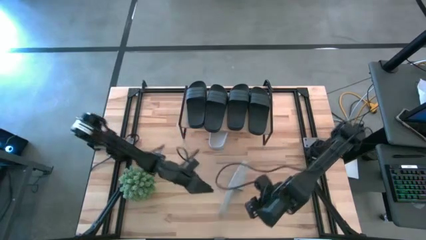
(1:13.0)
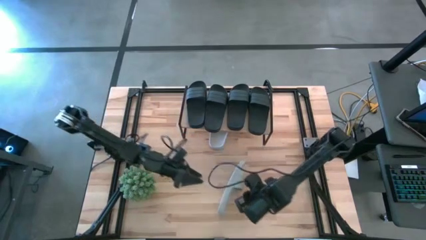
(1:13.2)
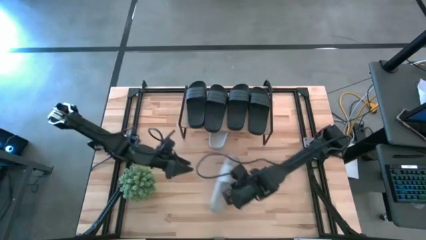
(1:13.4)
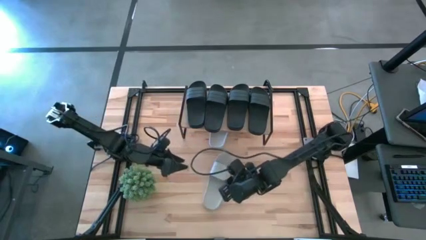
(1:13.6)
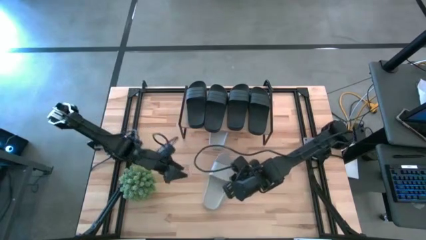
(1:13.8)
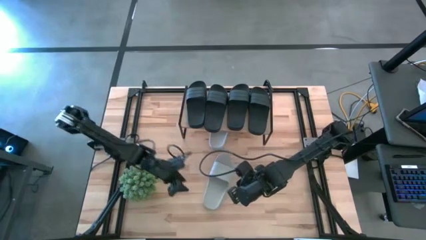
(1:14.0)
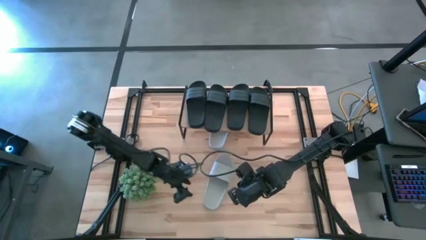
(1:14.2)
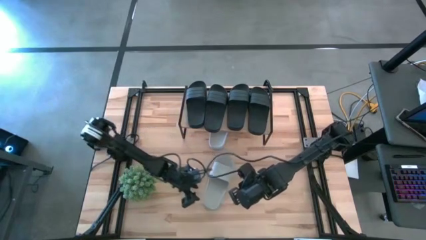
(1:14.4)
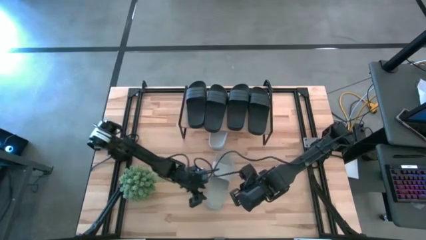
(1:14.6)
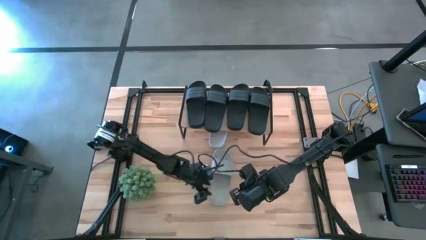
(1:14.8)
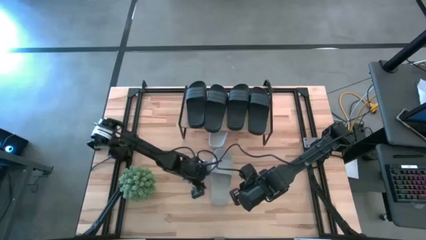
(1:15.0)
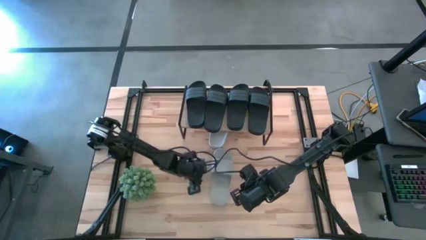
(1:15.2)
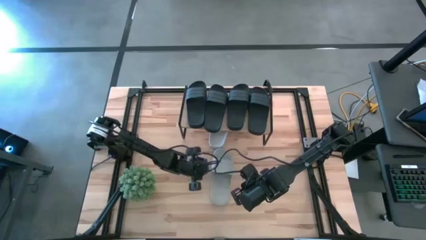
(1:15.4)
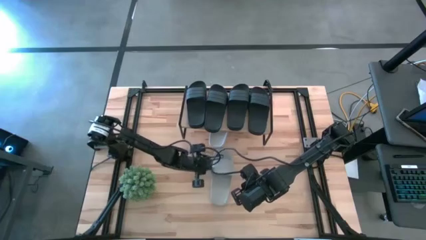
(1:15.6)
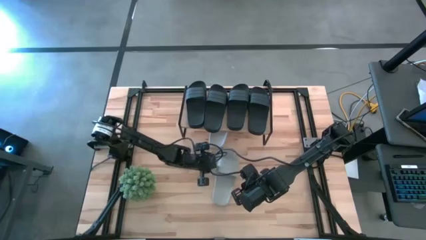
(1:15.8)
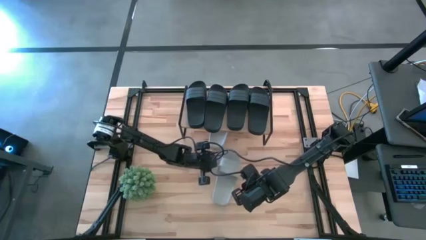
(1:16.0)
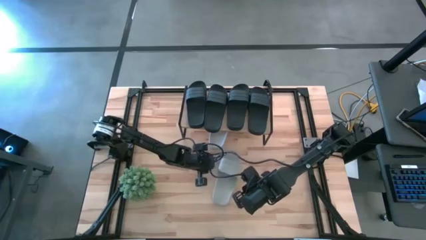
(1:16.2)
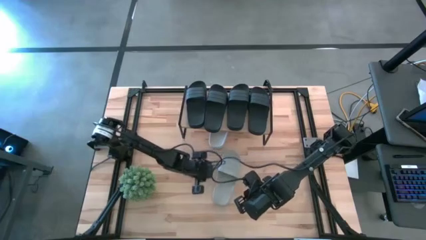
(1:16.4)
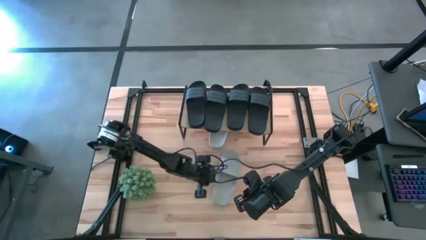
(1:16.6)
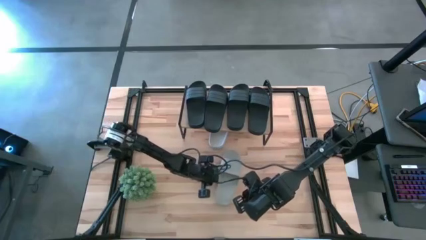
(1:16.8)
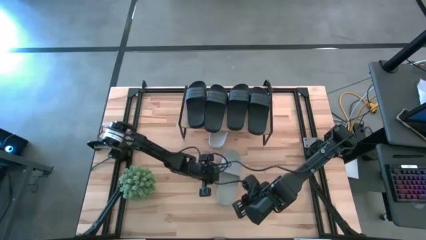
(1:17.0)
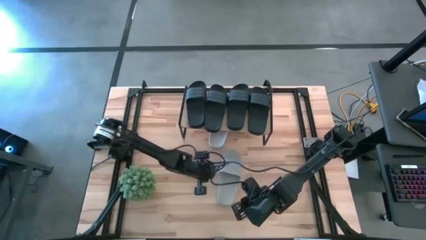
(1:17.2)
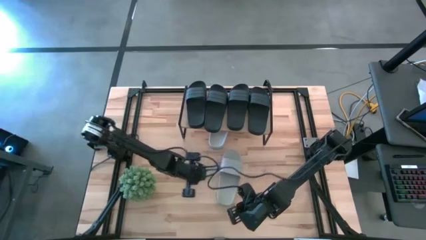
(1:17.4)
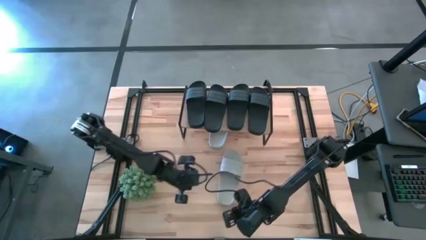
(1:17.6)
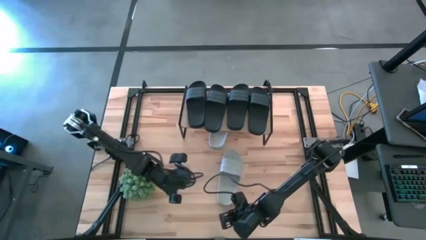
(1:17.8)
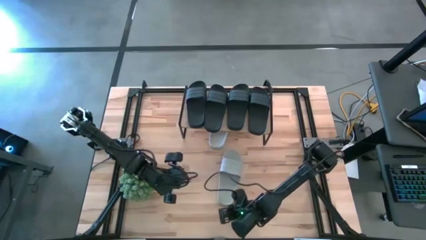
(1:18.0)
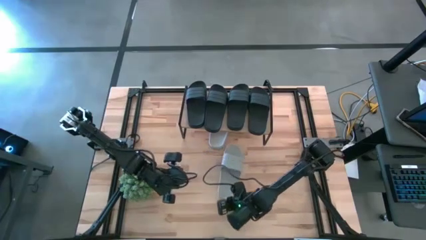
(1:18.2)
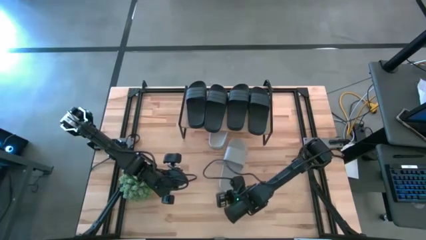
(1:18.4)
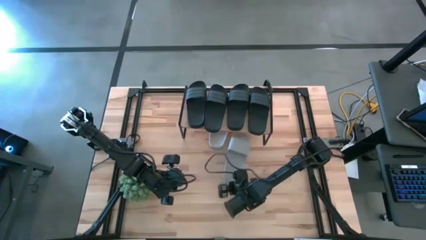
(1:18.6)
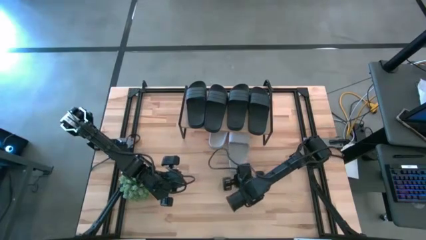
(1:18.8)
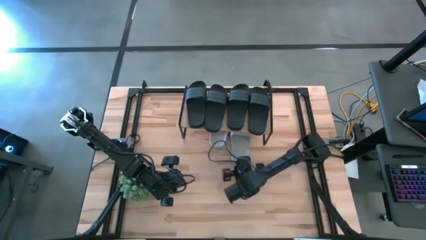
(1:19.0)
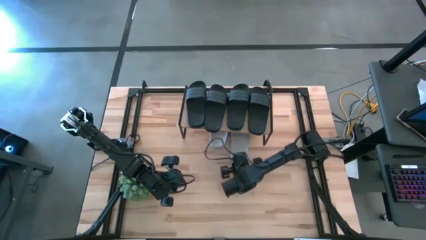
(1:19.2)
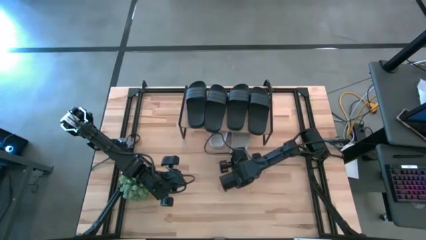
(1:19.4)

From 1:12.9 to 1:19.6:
Task: Pick and place slides into the shelf
Put the right gray slipper under the shelf

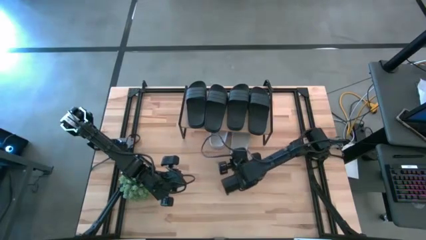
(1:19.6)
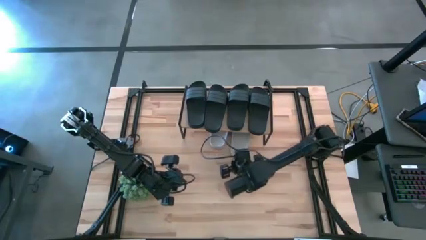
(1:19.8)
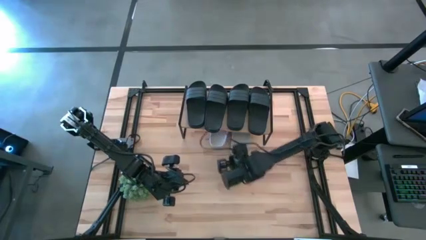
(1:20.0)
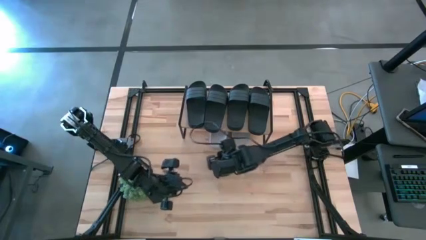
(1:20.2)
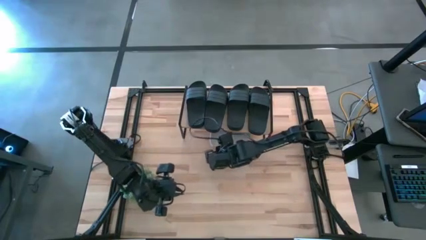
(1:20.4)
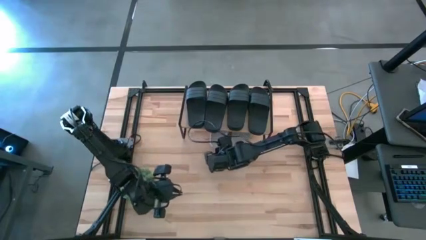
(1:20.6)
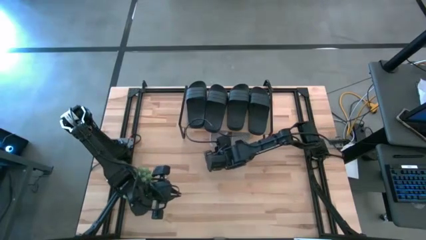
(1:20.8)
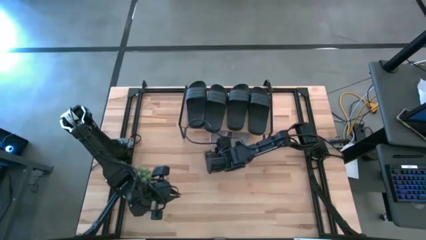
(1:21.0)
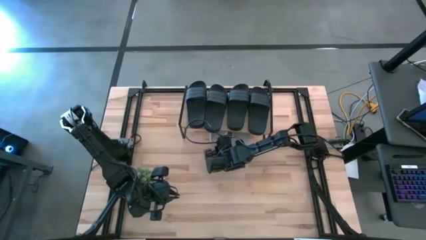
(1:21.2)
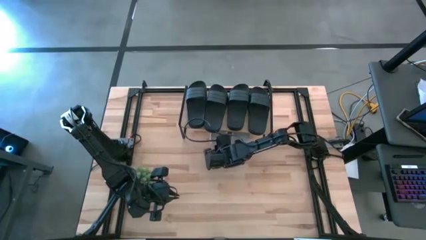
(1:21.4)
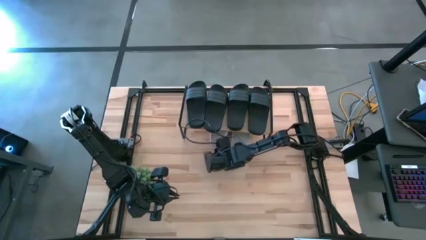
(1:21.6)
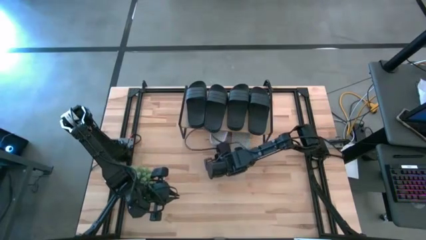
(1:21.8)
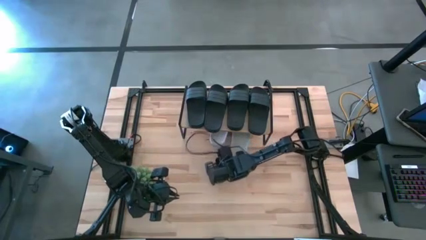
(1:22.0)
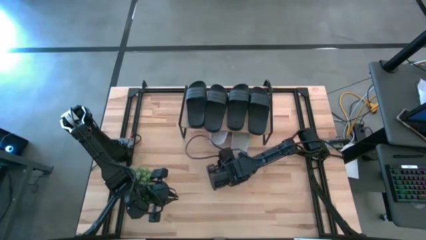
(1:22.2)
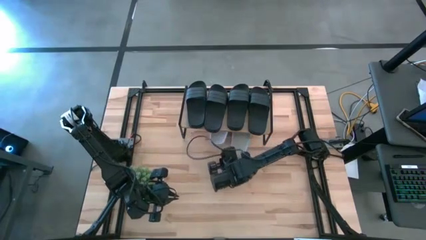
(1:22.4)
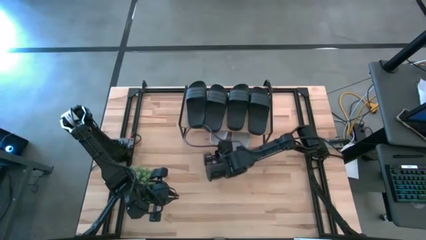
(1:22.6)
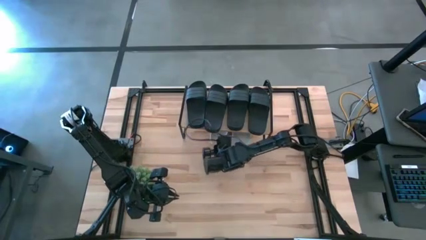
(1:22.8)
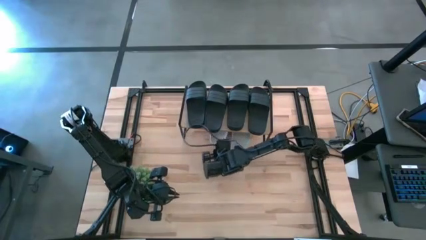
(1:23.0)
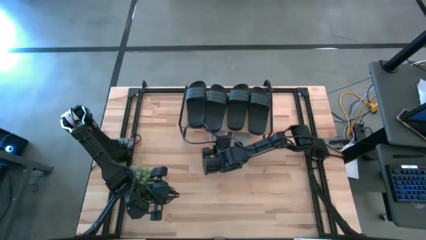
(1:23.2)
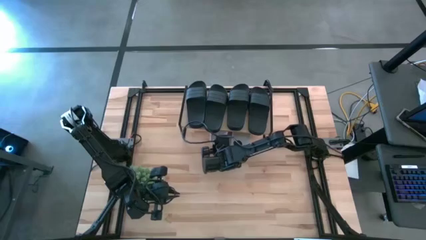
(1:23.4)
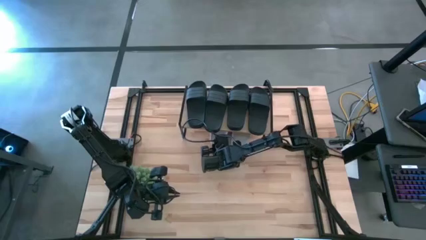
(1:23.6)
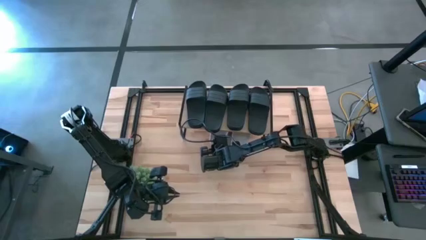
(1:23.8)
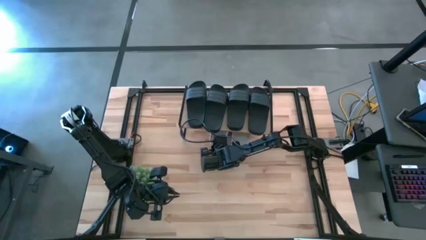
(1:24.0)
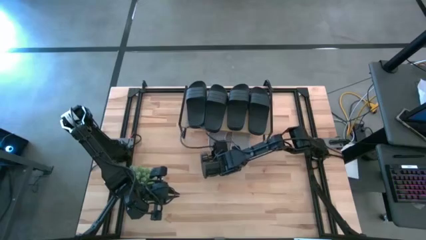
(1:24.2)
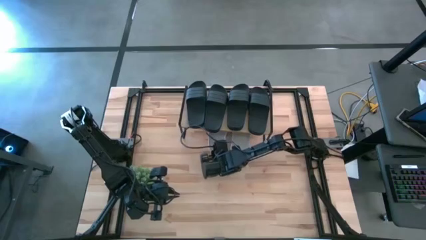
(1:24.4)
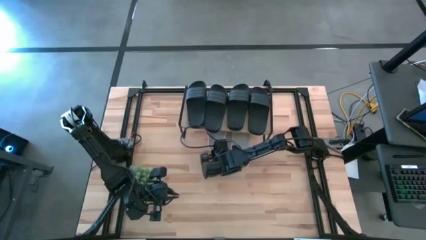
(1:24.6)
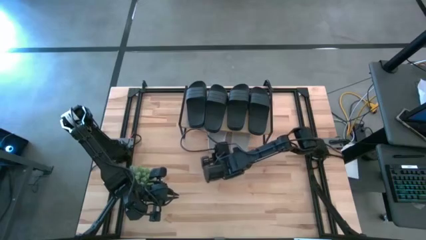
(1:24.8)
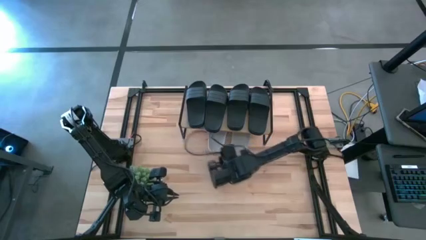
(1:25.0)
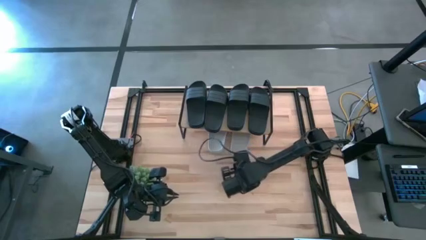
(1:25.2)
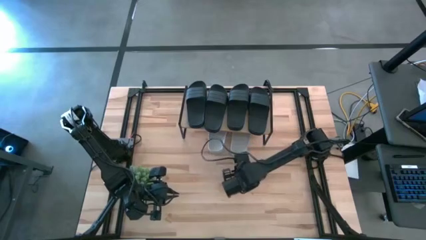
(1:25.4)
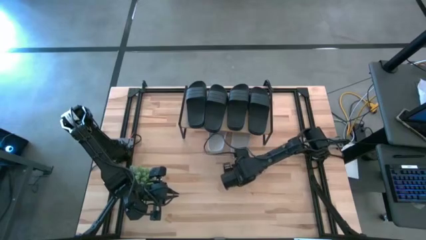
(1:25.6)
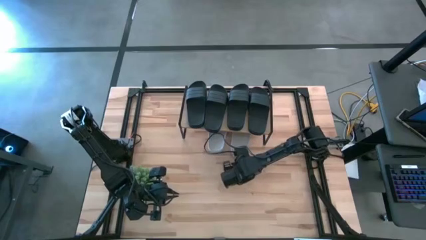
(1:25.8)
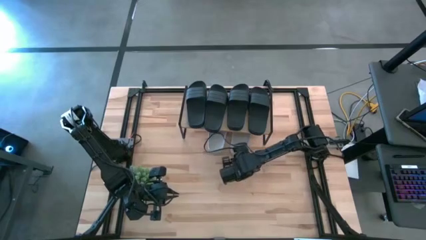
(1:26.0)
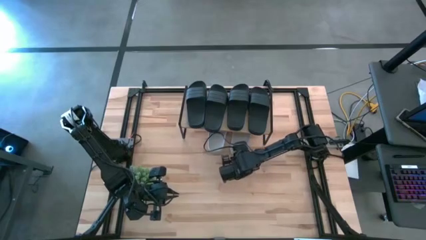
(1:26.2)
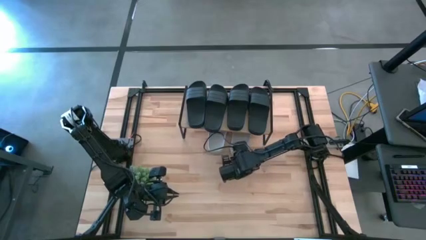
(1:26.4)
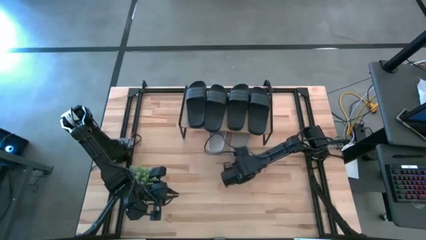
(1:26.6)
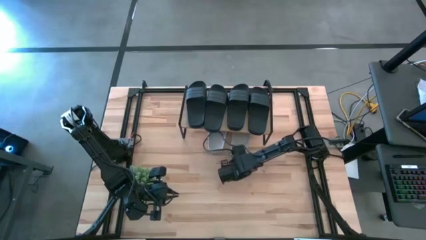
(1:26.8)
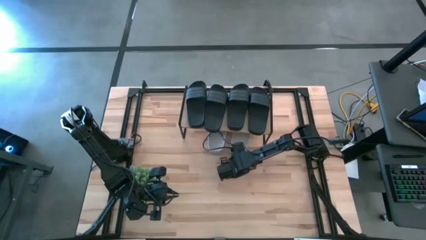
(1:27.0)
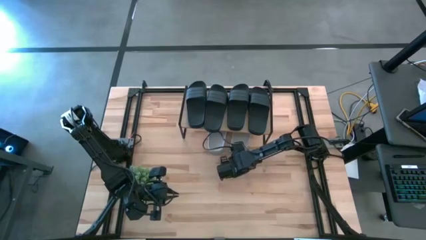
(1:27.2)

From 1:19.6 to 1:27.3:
Adjust the left gray slipper under the shelf
